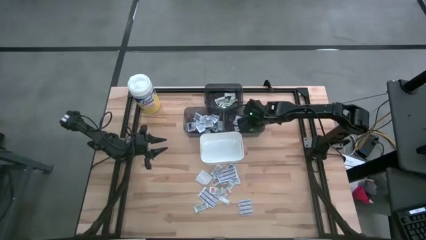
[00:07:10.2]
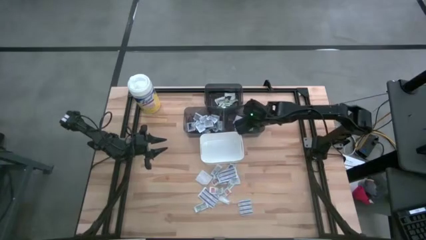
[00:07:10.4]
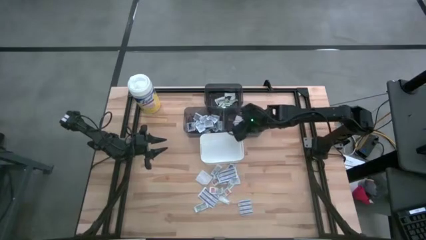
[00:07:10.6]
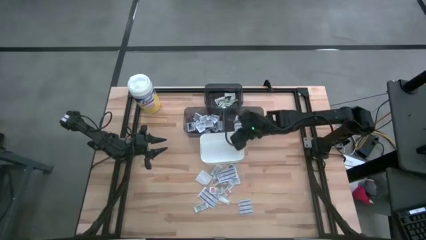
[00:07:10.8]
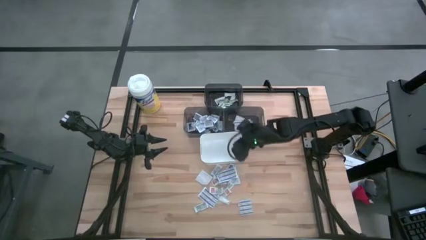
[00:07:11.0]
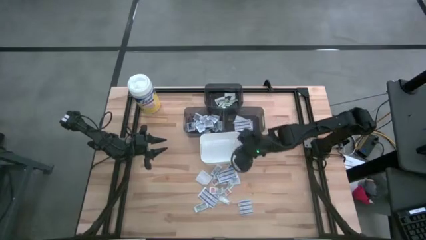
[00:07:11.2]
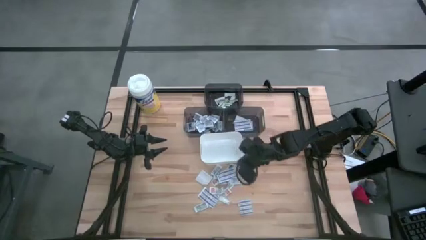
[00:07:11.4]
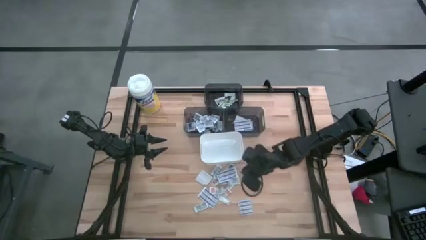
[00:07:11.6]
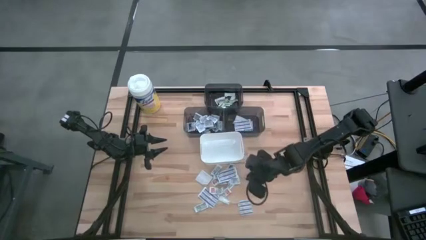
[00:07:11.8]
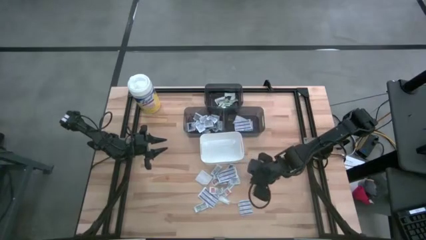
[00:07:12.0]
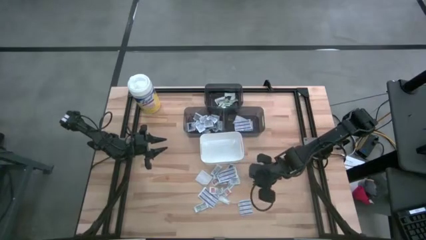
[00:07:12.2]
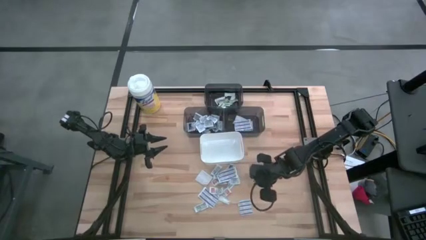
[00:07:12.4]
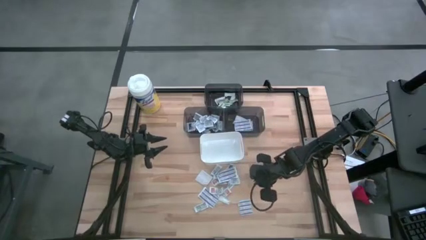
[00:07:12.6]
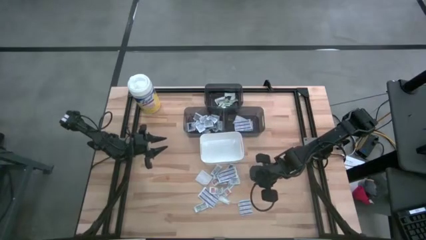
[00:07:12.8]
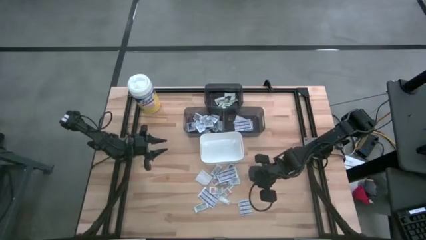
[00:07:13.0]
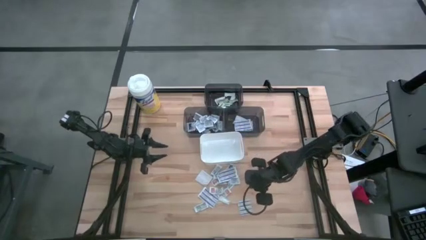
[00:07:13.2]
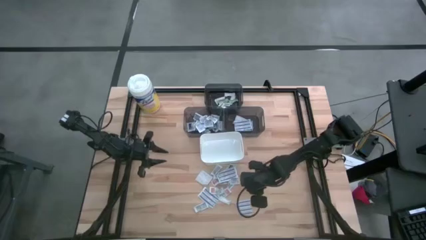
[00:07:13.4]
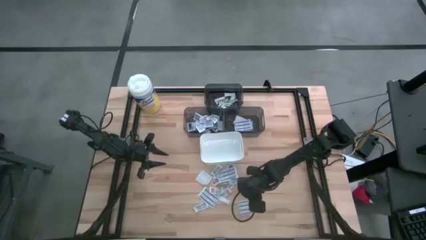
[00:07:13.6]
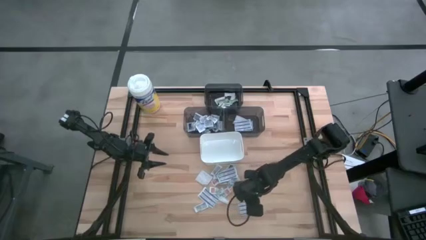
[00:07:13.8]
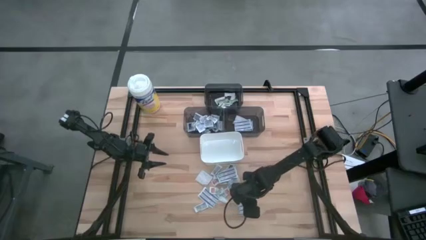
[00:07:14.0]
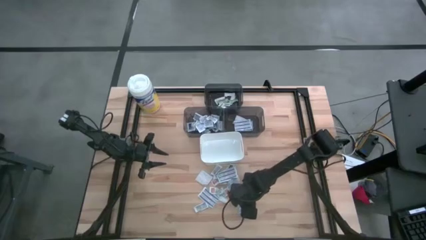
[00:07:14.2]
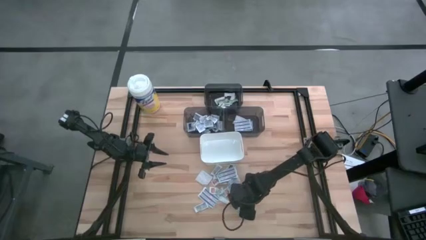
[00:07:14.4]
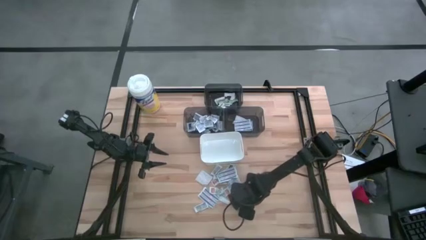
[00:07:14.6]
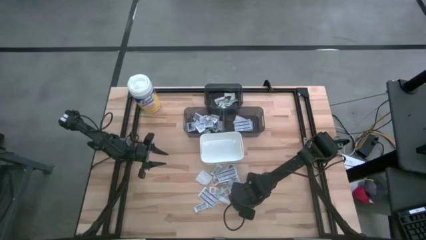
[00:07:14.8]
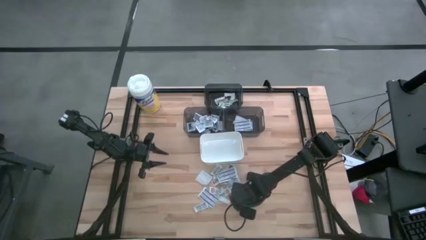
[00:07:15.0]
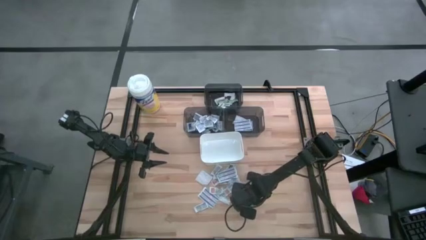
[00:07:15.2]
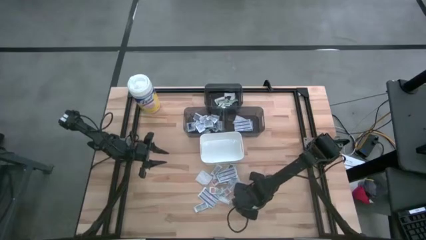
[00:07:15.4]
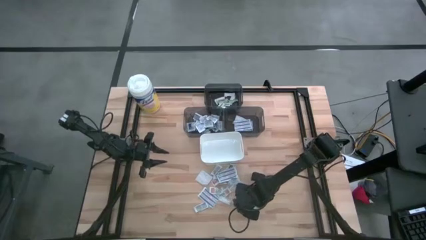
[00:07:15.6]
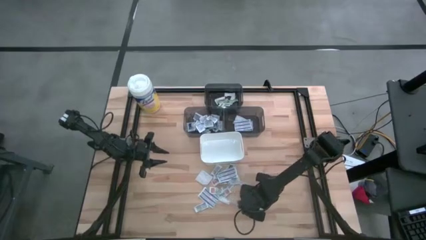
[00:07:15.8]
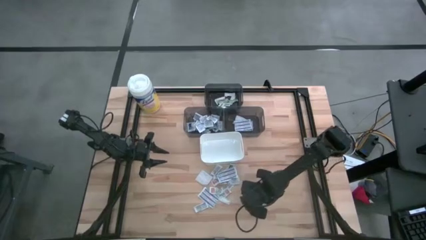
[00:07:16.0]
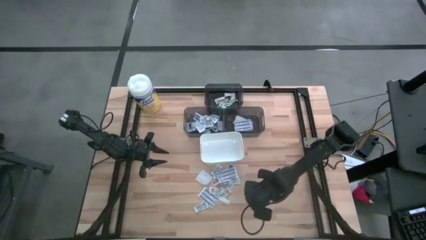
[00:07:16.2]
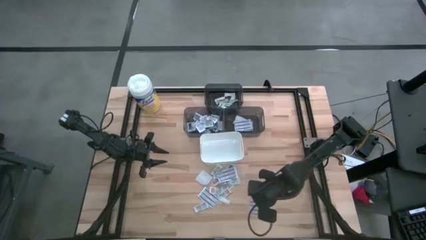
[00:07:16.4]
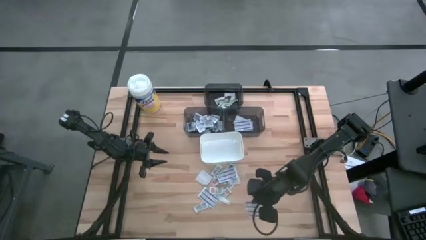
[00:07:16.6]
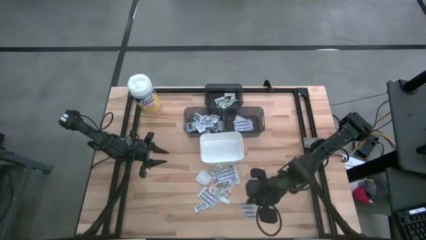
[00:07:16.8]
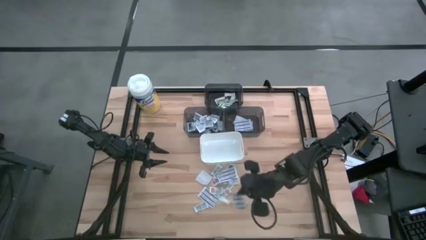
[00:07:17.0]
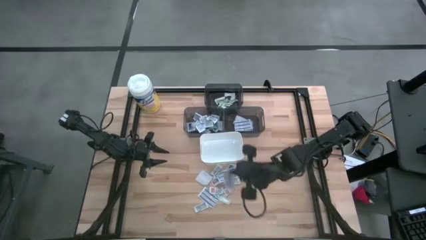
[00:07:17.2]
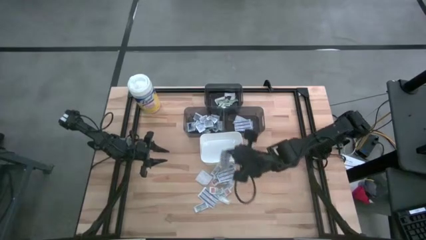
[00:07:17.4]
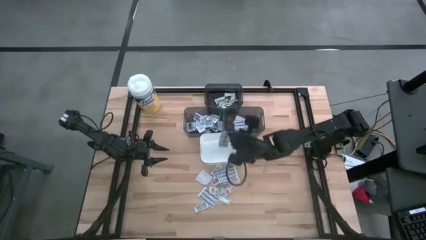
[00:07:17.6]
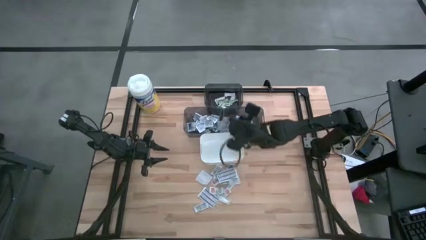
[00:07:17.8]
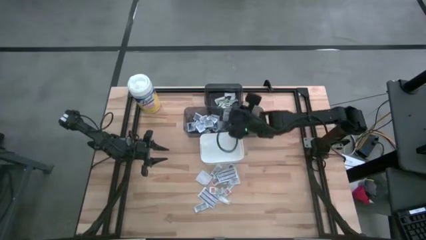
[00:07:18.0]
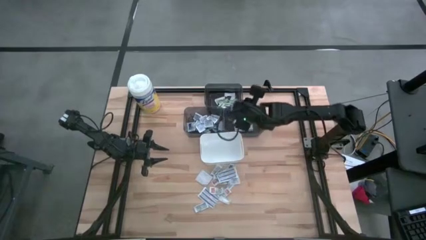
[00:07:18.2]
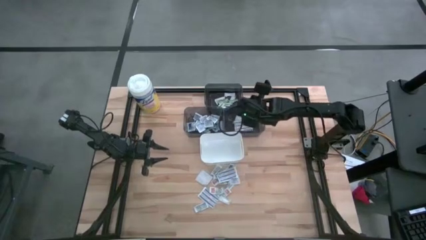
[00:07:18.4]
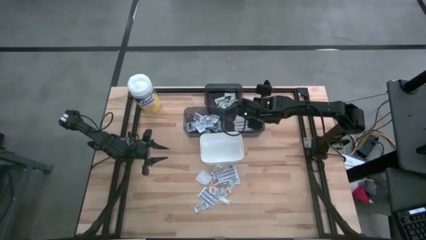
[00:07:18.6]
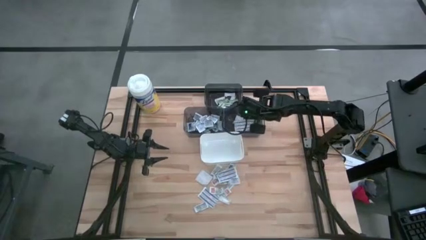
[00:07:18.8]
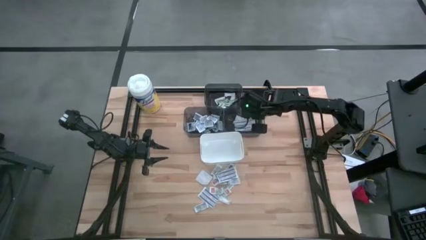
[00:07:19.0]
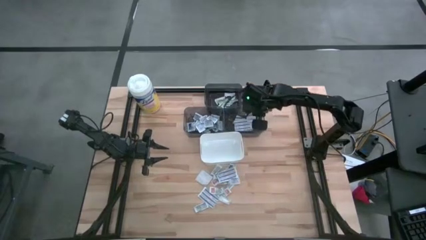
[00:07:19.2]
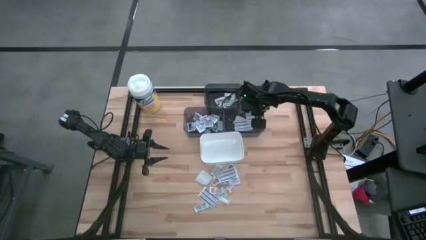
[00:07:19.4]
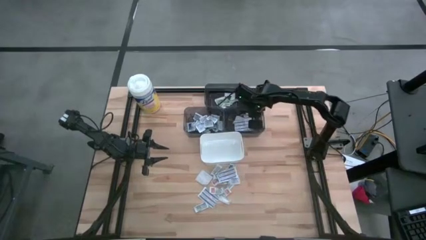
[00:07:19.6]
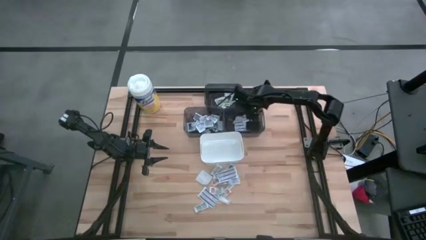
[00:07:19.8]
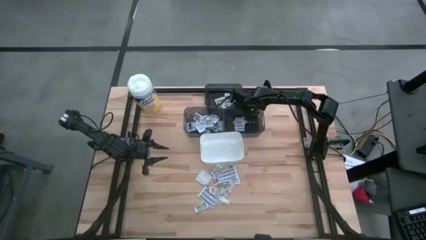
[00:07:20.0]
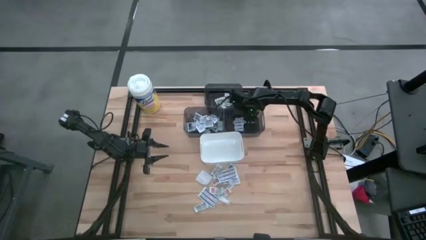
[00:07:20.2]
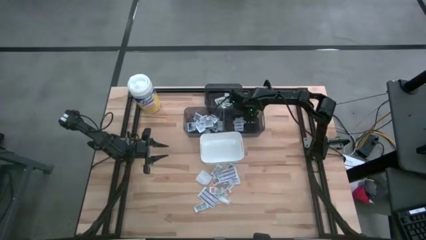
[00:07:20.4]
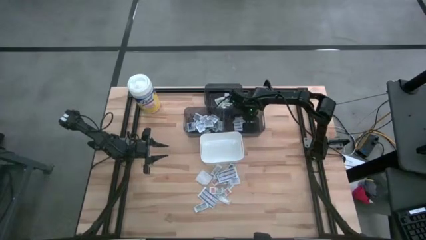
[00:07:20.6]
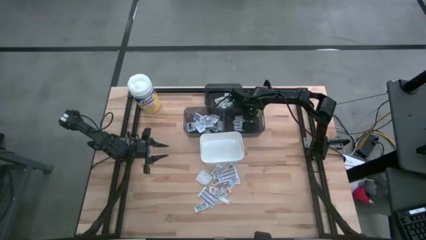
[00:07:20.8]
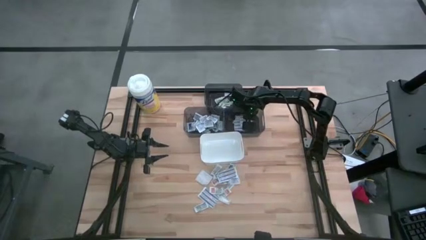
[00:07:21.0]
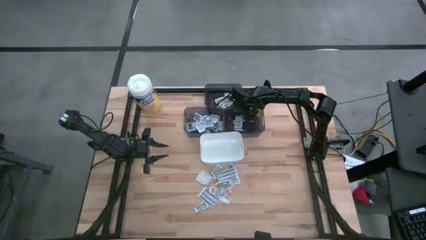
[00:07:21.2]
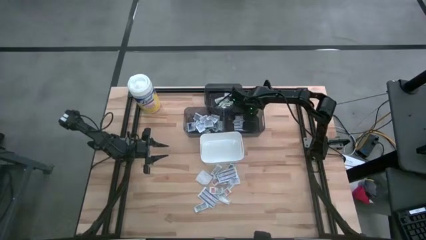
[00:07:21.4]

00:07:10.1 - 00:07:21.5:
Task: Pick & Place First Aid Supplies
Put the blue bandage into the right black bin

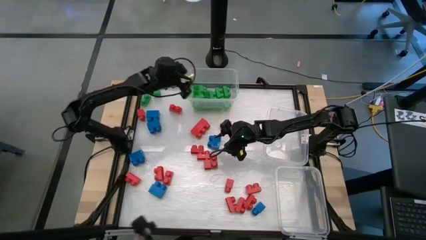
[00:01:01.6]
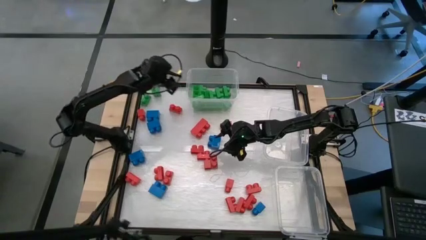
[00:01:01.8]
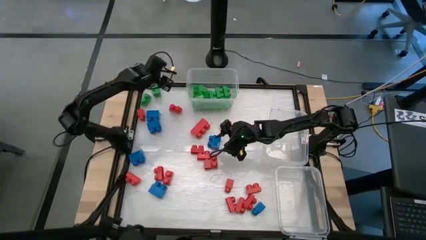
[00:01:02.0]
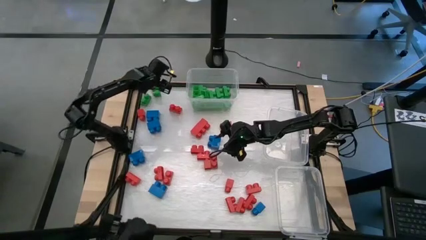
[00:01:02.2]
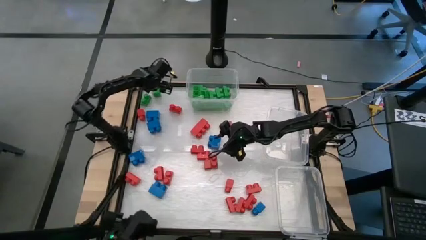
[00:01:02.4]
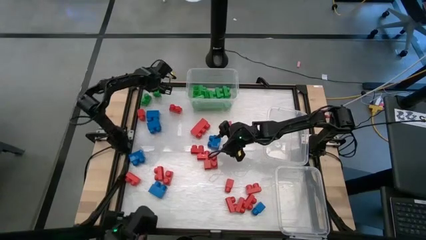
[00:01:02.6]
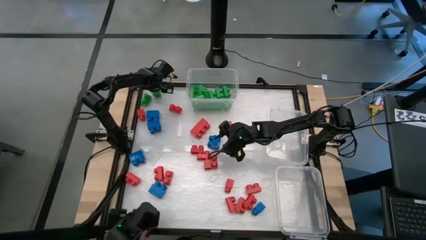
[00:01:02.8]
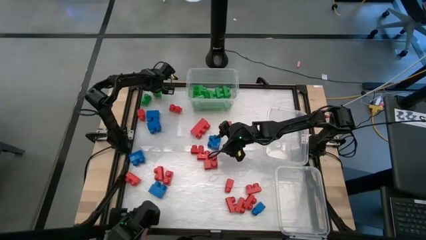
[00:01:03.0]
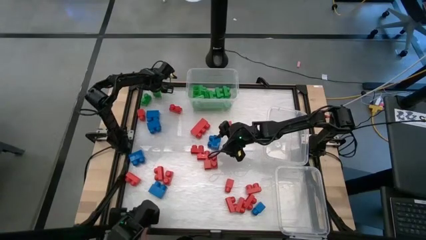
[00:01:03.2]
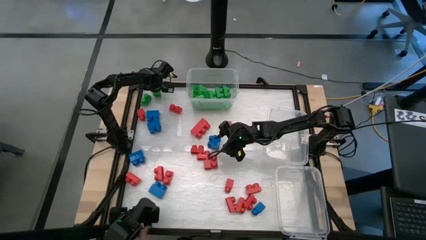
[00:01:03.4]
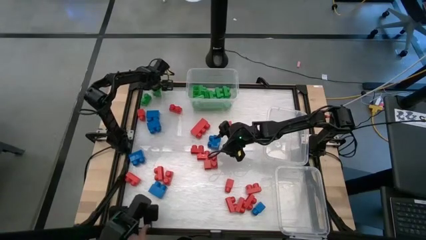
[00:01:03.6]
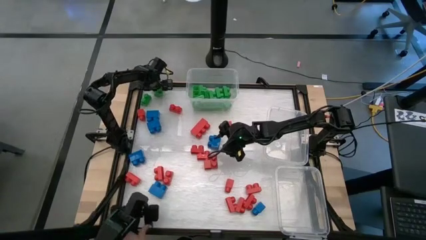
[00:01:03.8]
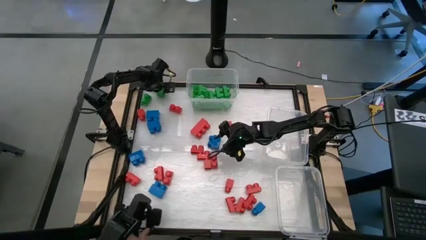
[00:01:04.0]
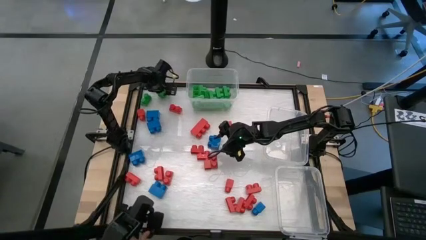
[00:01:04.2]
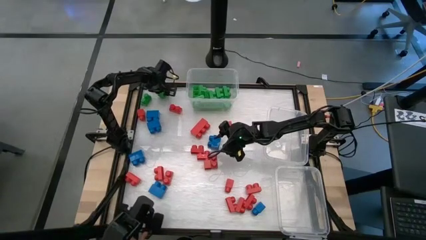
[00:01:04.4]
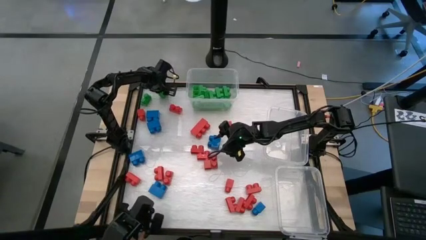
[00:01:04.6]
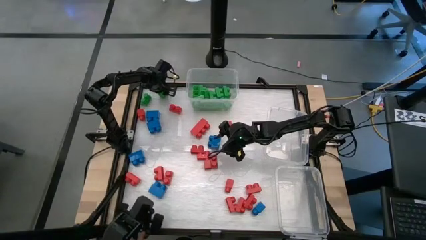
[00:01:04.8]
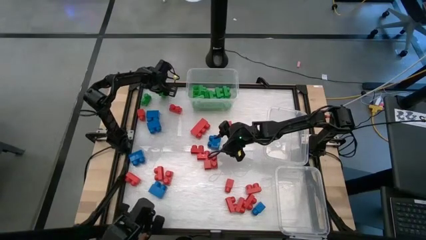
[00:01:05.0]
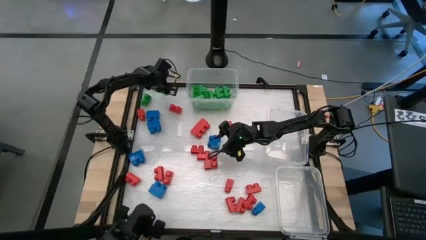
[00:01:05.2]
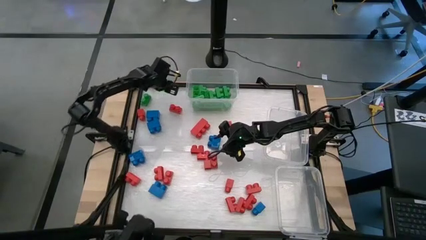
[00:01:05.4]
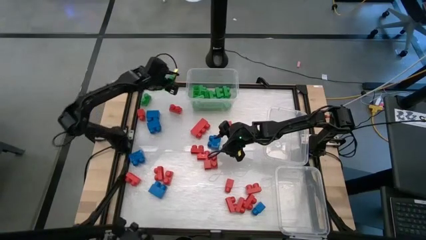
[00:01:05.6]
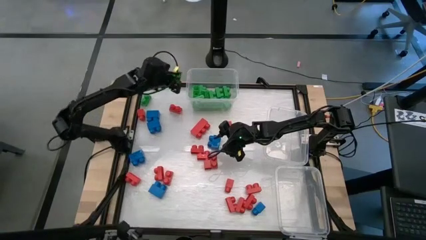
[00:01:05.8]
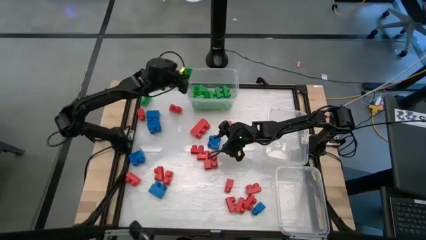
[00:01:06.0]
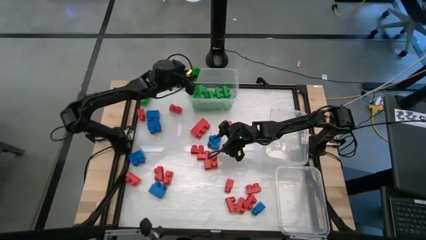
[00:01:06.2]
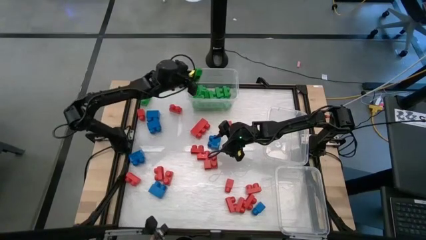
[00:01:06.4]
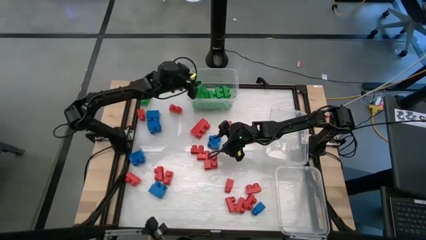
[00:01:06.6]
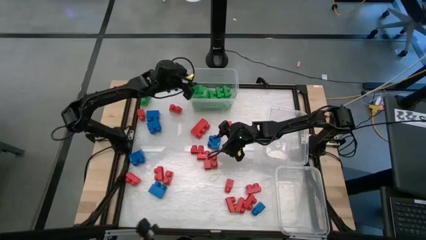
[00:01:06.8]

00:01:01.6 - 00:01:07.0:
Task: Sort blocks
Put the green game piece into the top transparent bin
